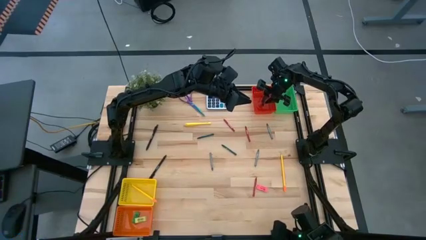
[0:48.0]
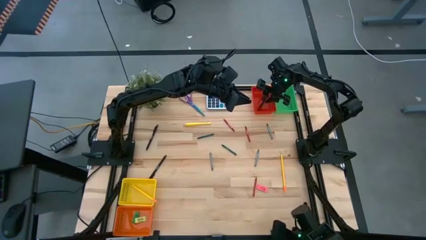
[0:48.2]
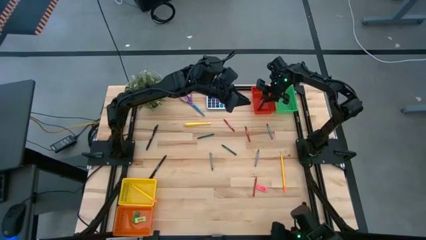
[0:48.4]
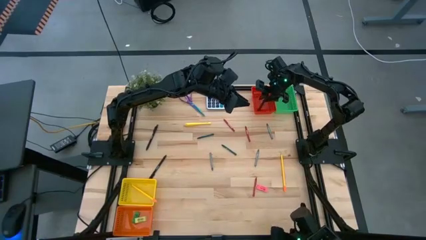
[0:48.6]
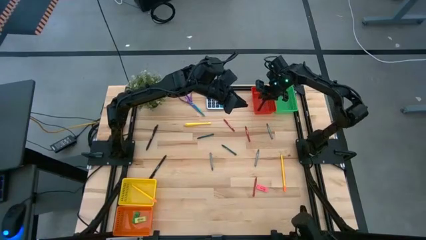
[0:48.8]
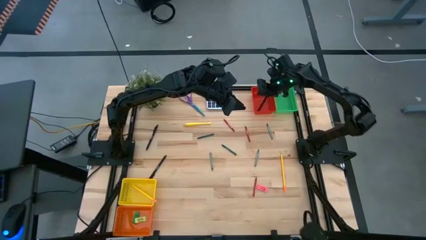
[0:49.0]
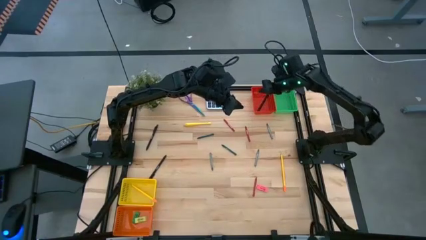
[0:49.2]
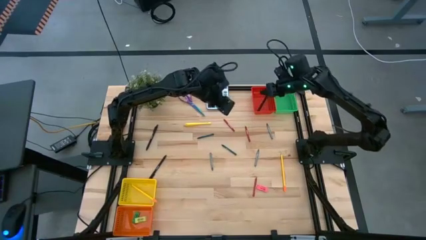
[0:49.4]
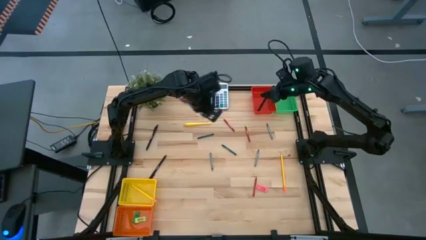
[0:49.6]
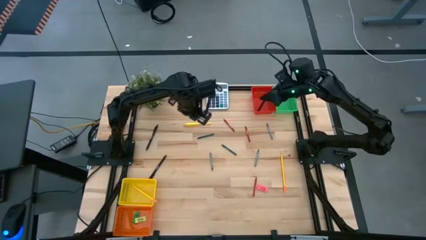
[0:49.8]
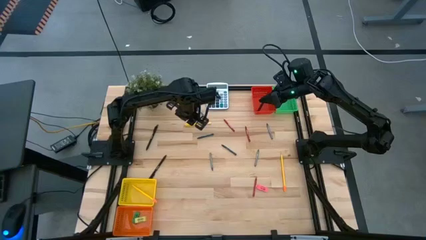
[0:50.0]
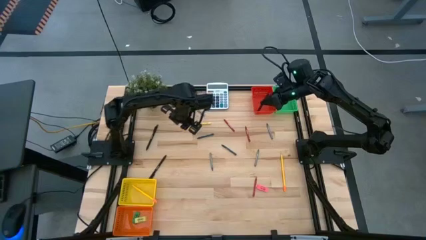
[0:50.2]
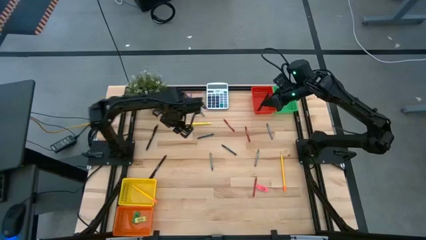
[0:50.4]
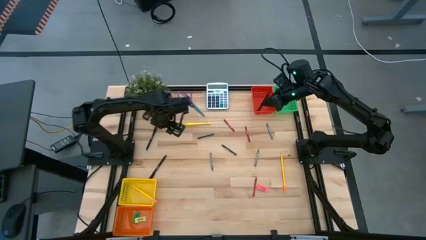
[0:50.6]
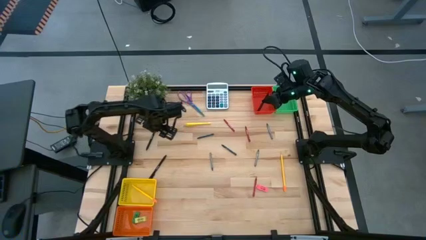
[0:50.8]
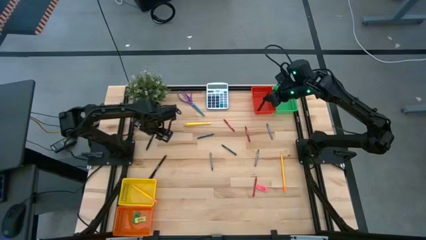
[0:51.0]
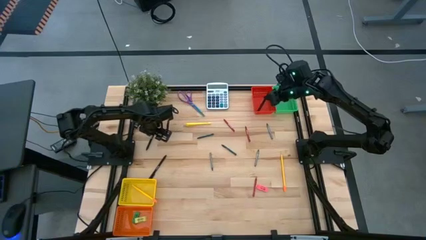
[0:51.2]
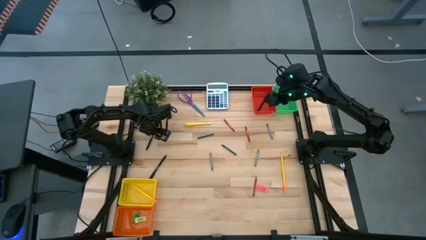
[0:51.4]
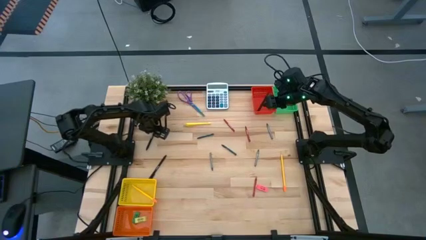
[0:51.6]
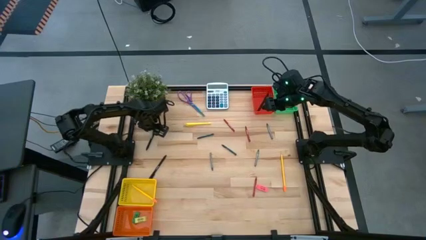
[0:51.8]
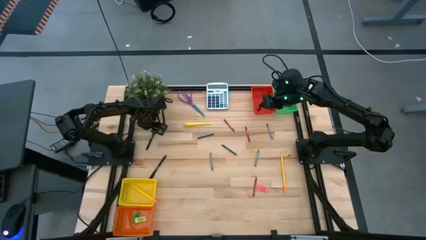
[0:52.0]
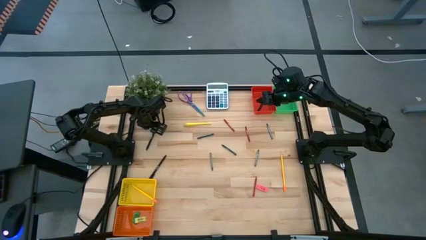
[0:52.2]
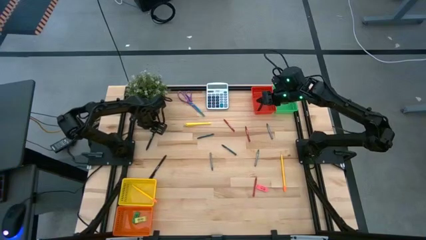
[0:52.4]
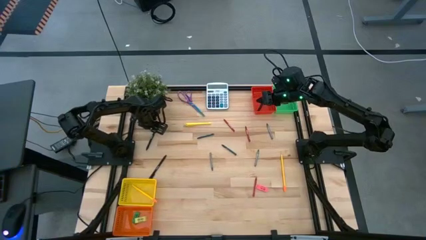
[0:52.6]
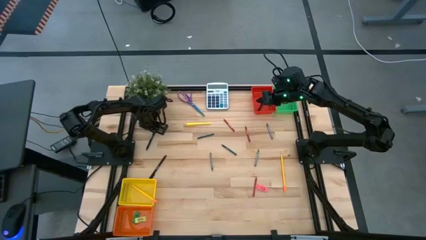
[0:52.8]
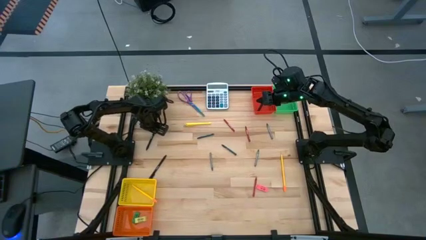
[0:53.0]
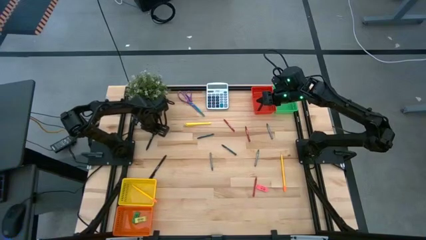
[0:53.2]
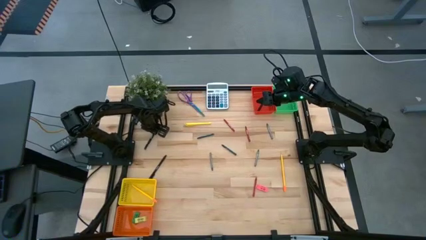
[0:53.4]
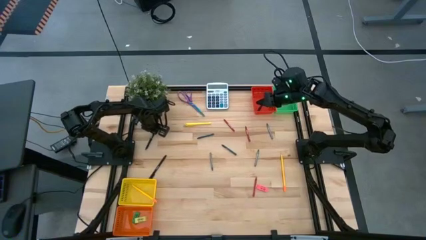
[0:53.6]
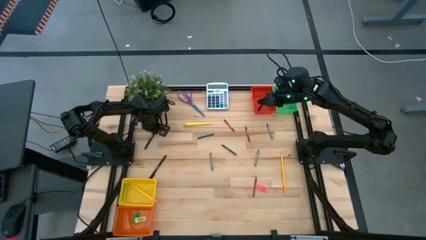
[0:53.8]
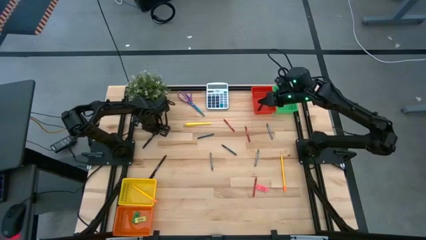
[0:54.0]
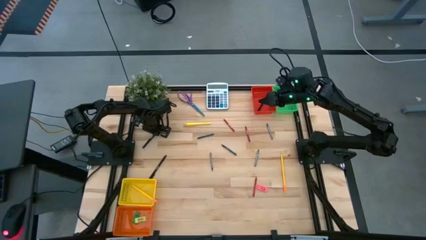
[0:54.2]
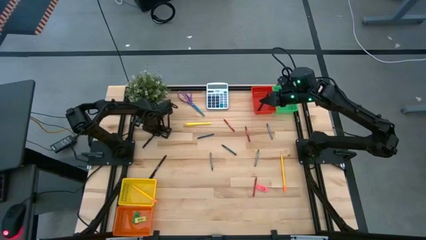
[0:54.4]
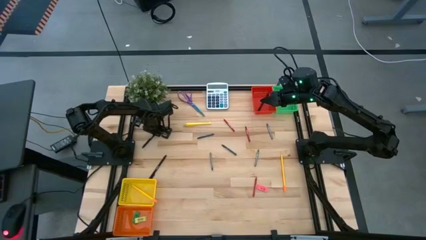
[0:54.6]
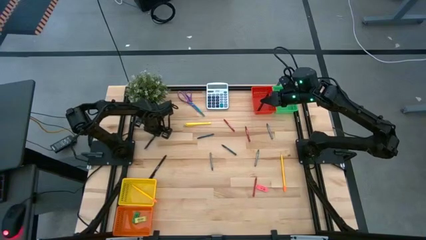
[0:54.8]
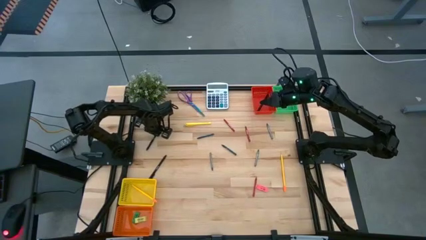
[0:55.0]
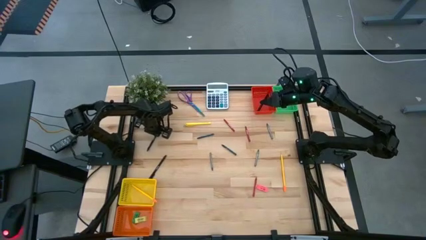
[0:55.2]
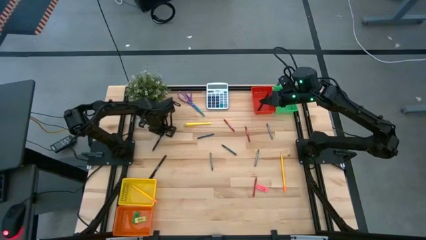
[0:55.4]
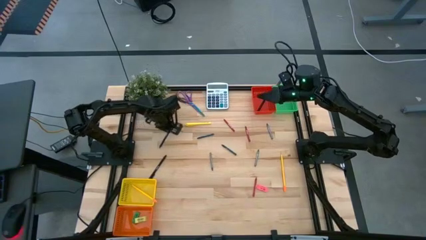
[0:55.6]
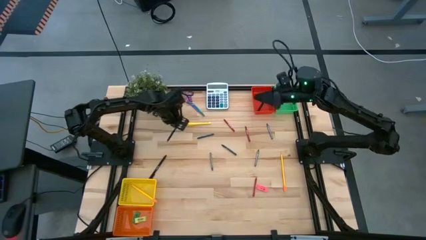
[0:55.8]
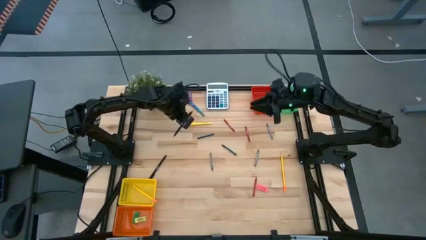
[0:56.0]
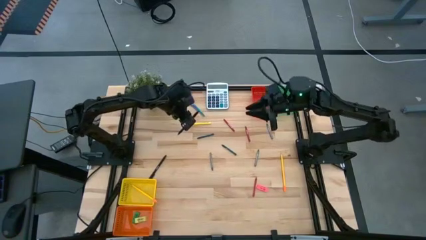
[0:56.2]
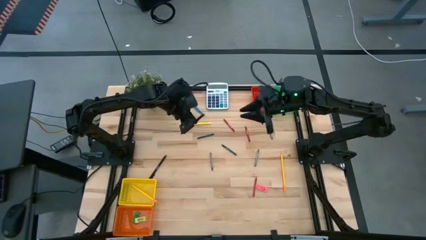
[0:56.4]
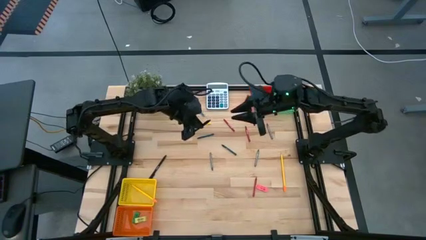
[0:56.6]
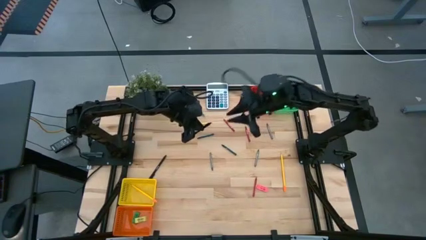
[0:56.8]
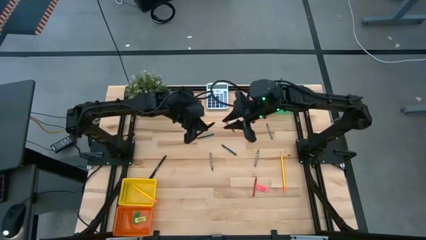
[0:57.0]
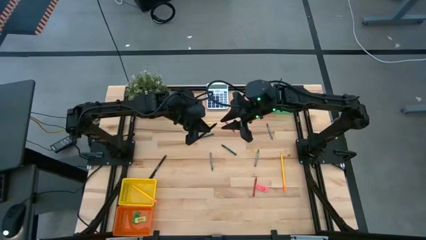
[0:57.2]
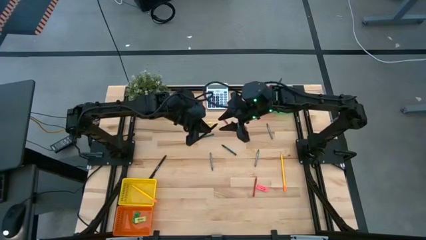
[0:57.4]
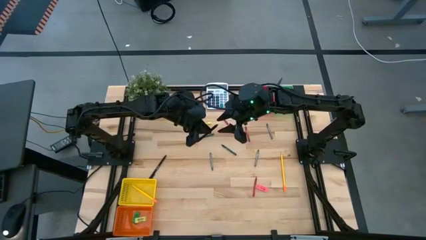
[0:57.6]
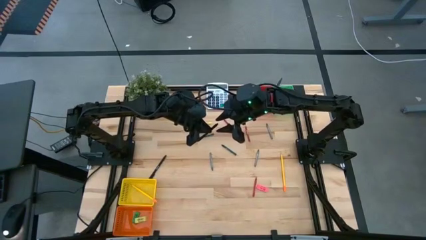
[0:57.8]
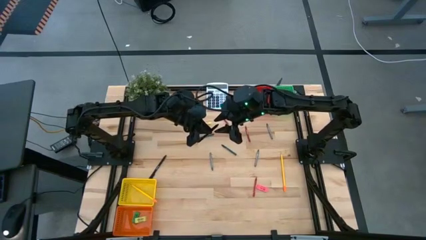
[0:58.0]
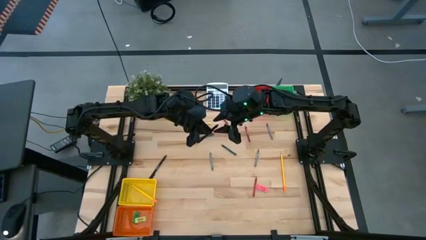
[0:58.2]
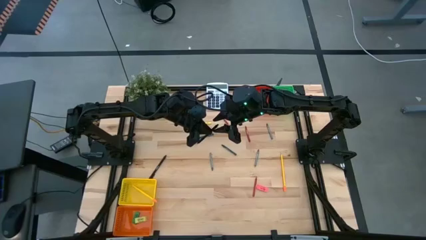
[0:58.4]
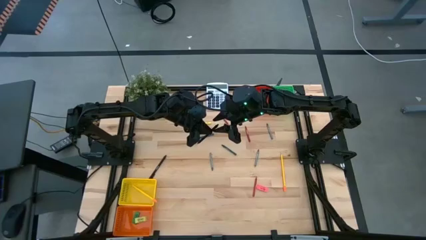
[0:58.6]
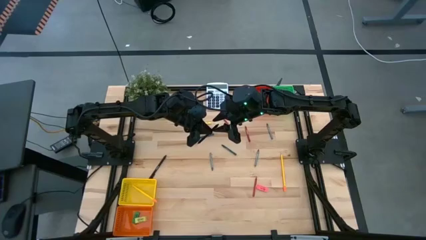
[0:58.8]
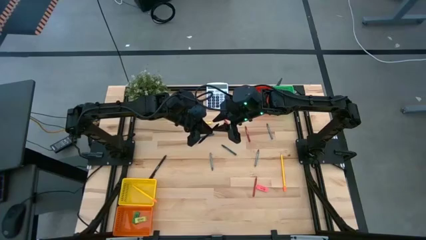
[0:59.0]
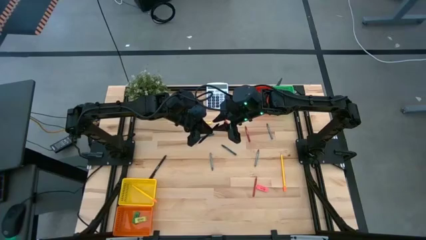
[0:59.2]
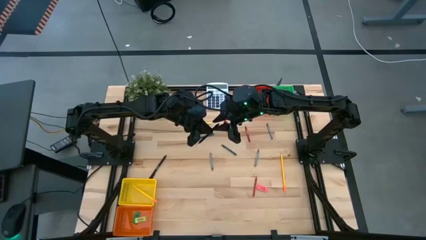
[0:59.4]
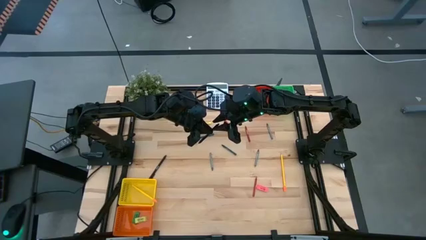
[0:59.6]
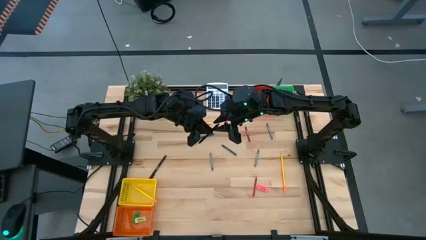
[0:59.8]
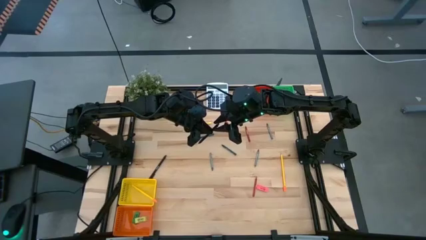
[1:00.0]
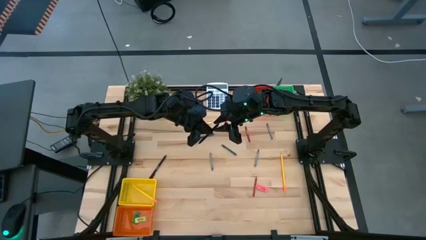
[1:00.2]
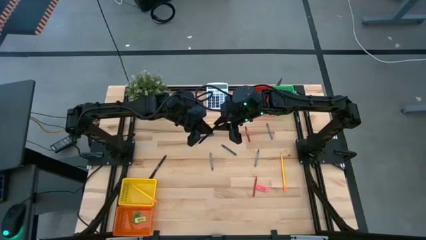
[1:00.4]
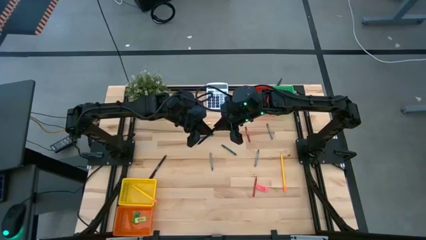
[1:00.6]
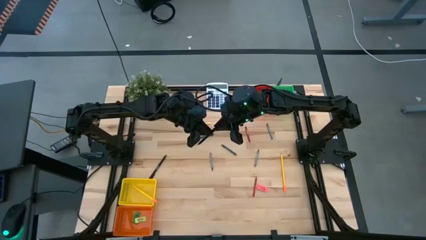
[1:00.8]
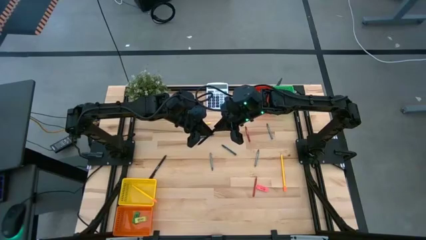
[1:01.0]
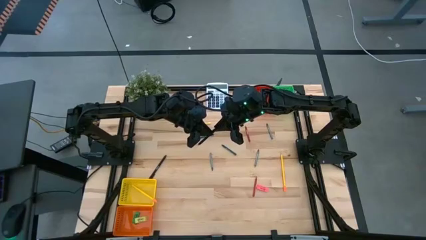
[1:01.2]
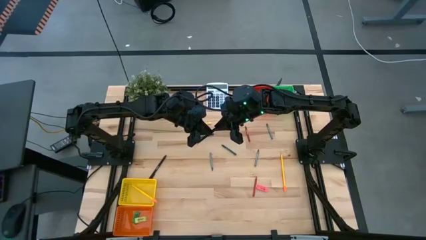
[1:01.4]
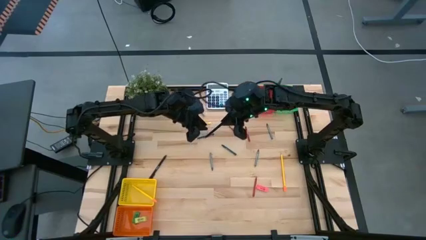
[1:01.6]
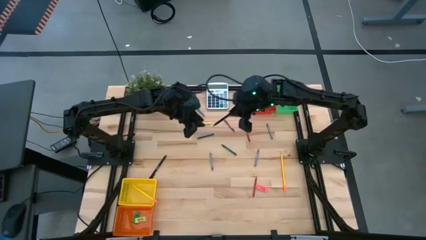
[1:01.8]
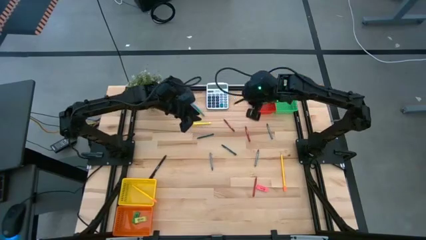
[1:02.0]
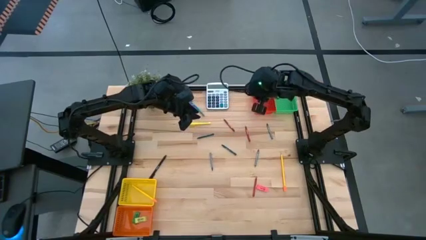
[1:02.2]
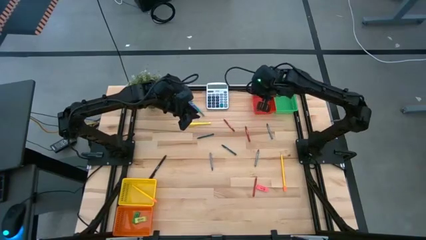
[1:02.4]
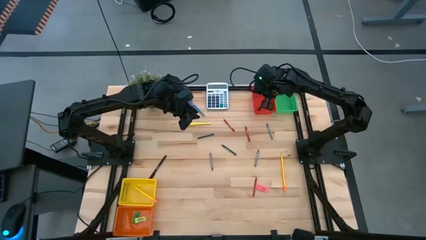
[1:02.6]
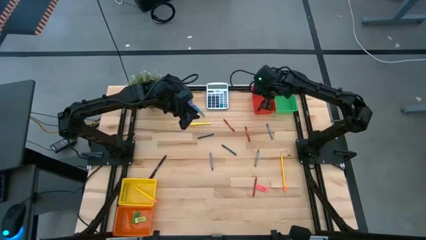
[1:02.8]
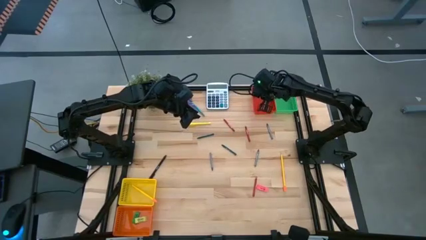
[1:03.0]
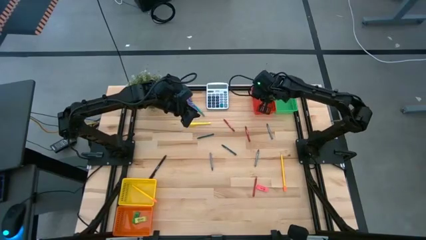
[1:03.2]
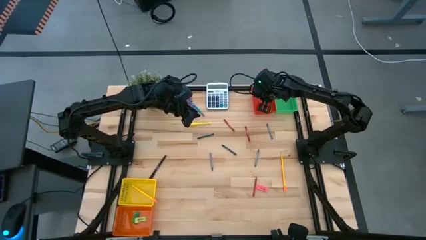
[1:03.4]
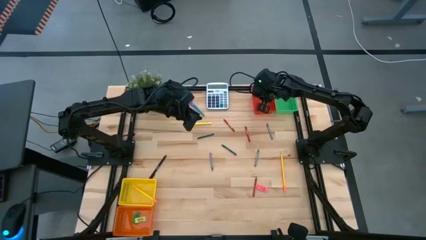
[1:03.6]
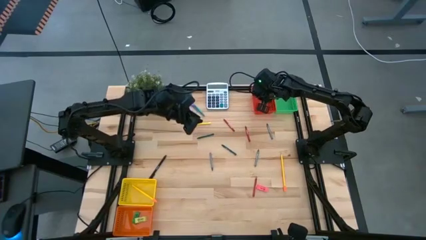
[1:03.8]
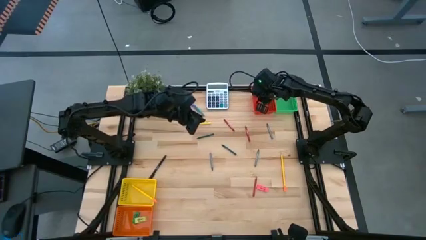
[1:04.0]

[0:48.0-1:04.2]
Task: Sort crayons/erasers/pens/pencils in bins
Put the top black pen into the red bin
